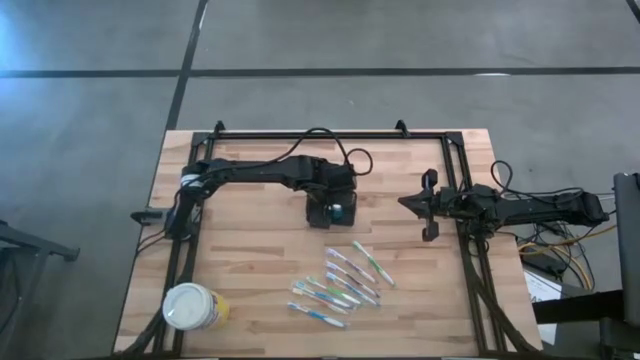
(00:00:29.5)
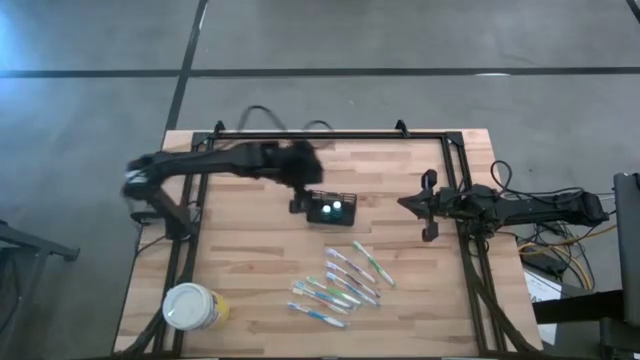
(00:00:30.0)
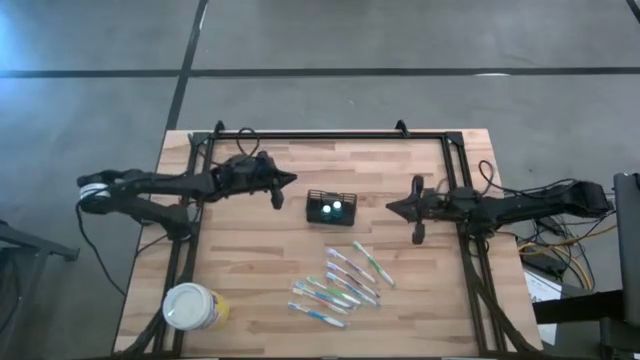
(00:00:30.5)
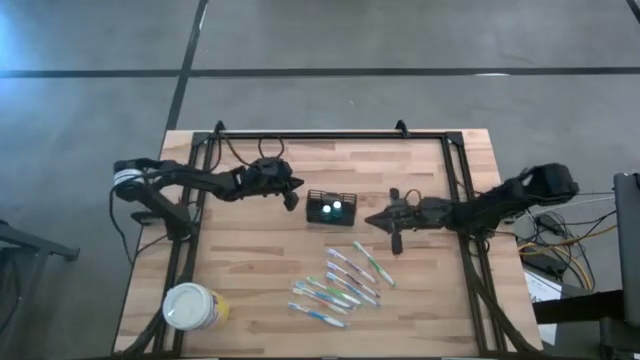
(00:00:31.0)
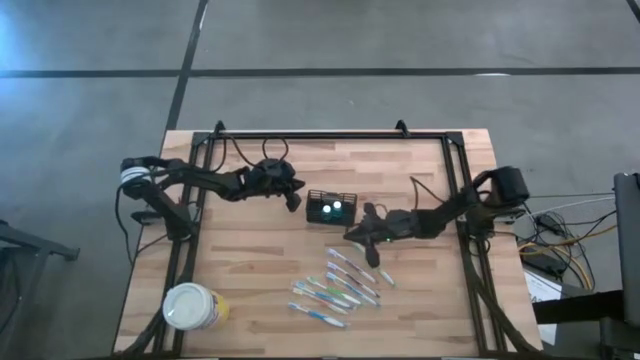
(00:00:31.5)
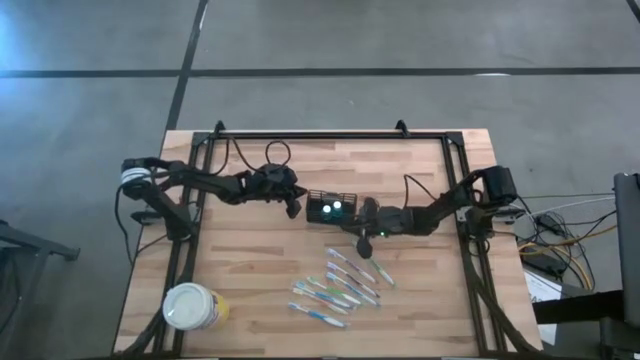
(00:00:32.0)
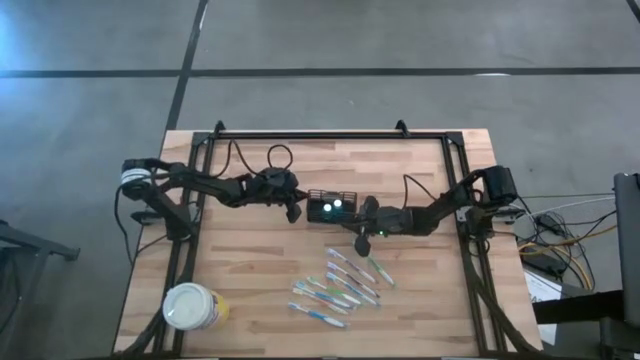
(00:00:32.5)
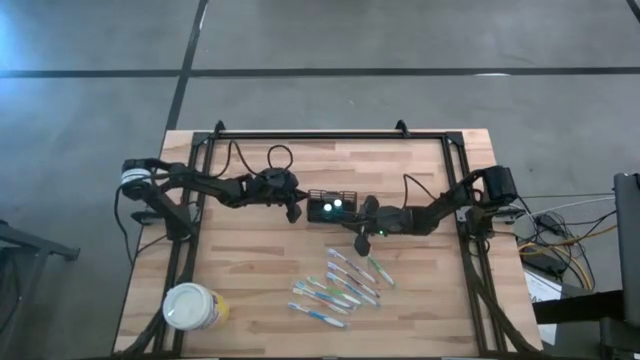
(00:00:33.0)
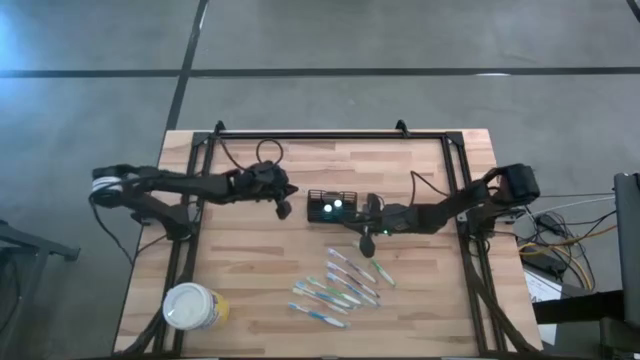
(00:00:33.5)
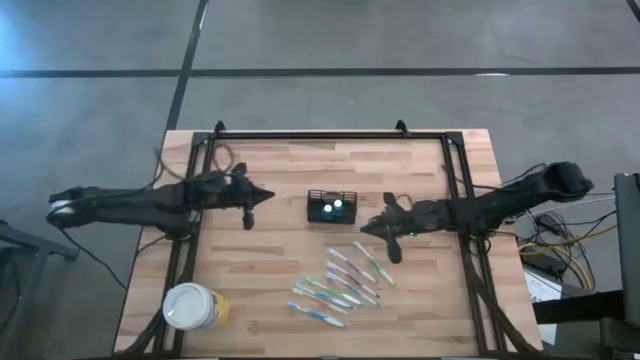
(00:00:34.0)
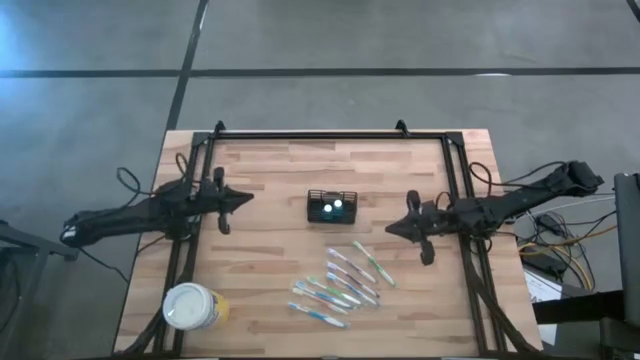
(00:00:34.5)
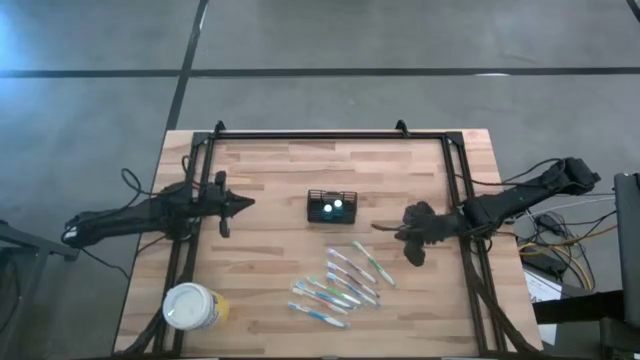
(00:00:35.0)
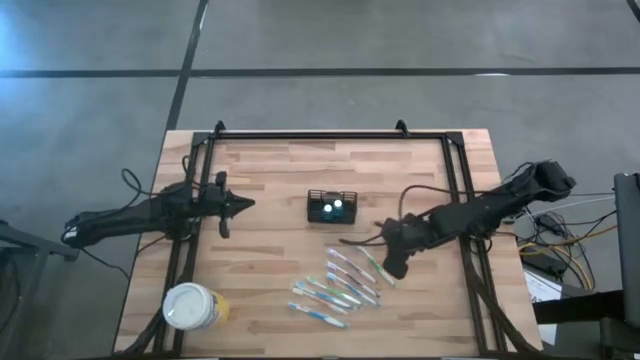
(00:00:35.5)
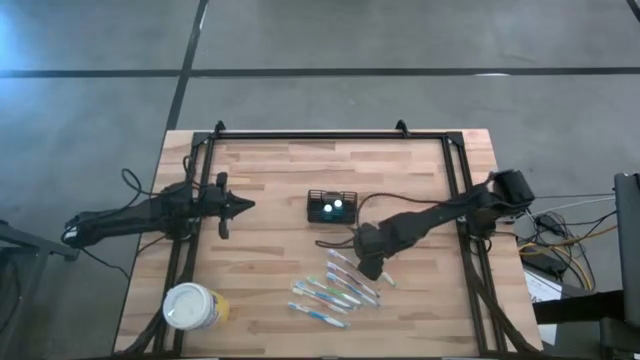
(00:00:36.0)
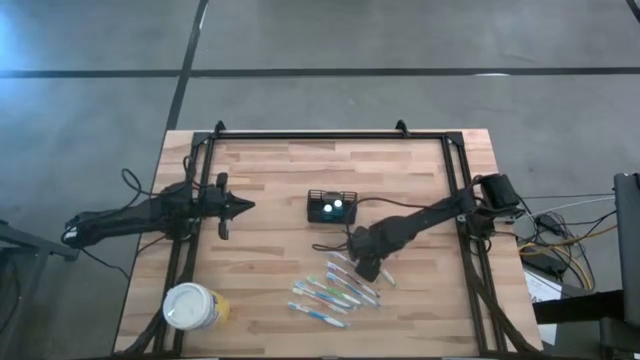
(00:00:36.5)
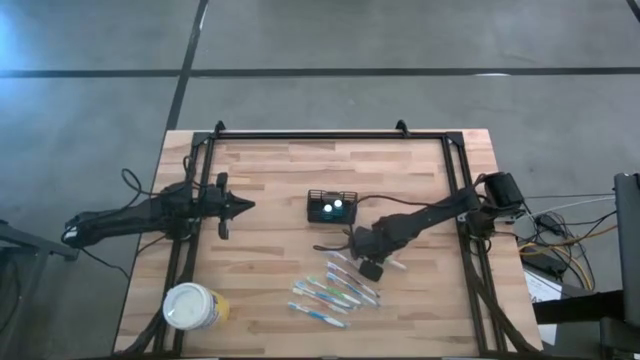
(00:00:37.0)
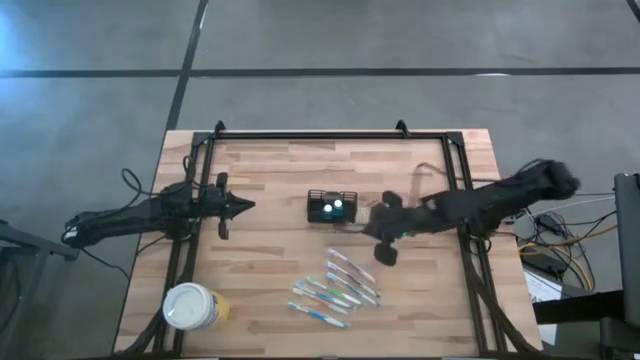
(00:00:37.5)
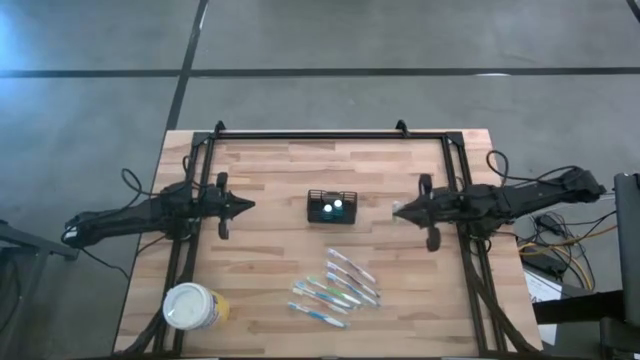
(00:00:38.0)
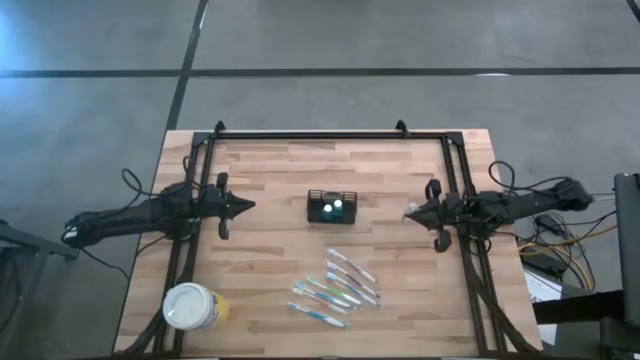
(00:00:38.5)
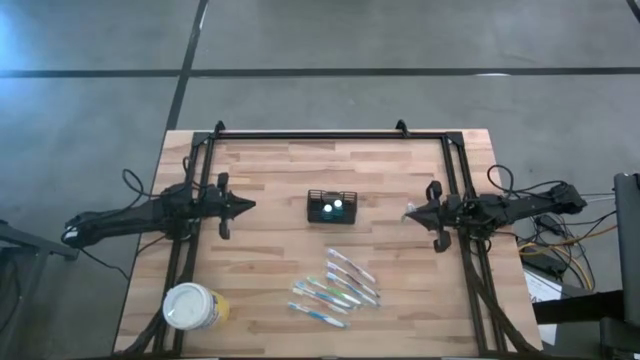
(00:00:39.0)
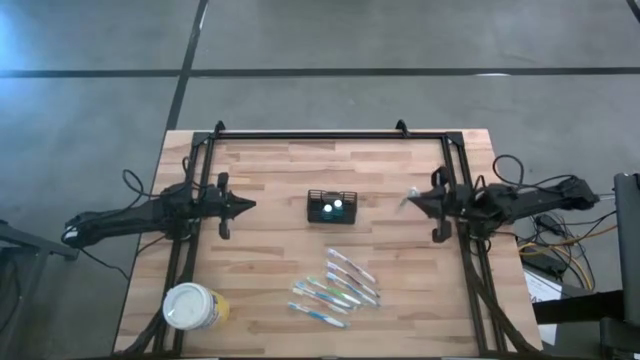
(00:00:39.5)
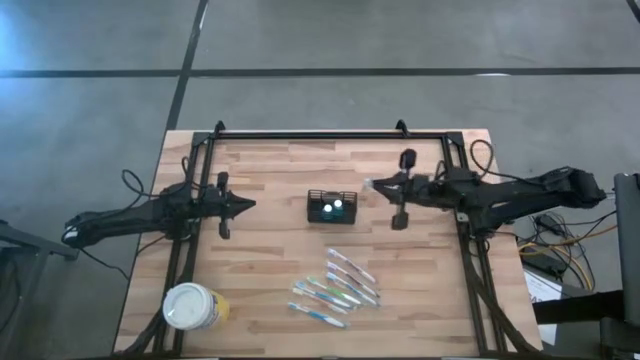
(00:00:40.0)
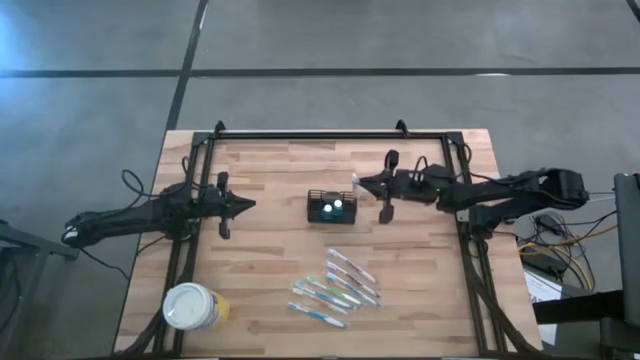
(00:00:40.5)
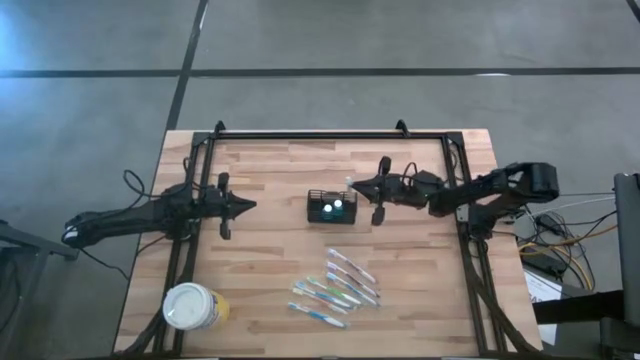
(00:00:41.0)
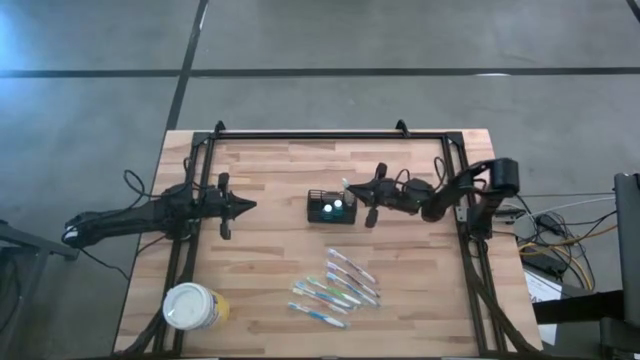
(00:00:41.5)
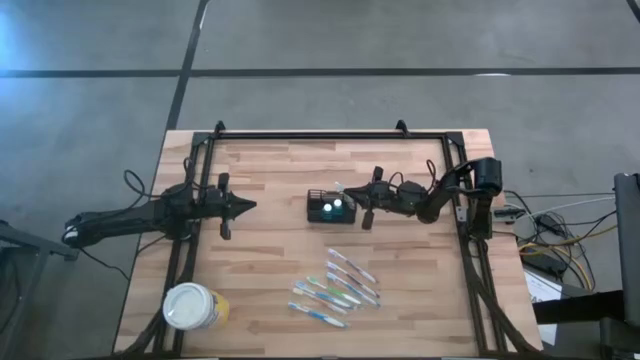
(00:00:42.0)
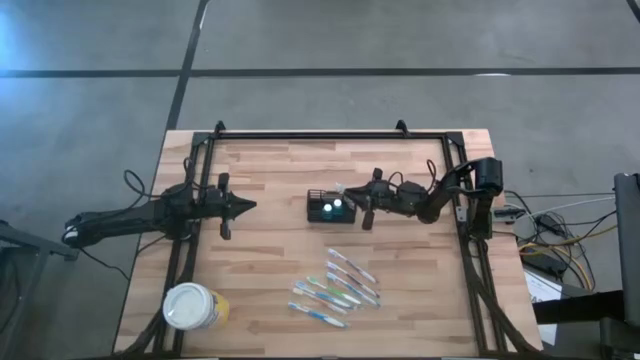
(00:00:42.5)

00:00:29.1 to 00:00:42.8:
Task: Pick & Place toothbrushing station
Put the top green toothbrush into the black organizer

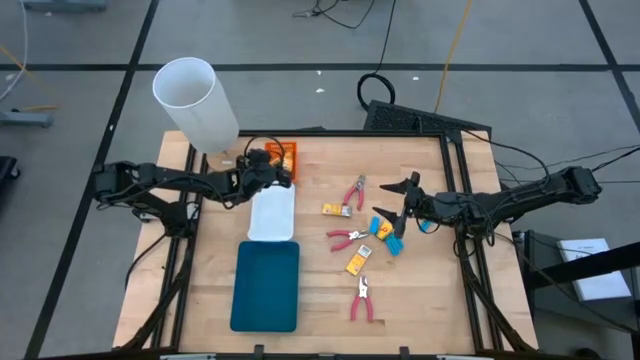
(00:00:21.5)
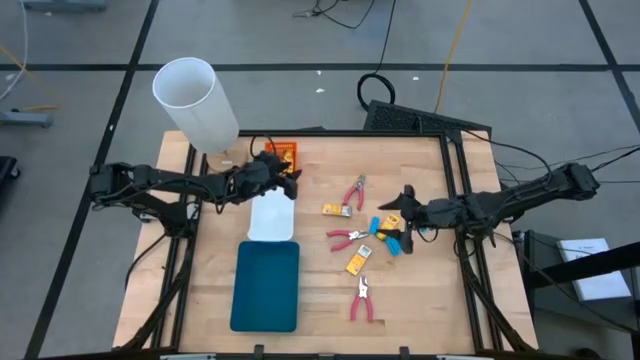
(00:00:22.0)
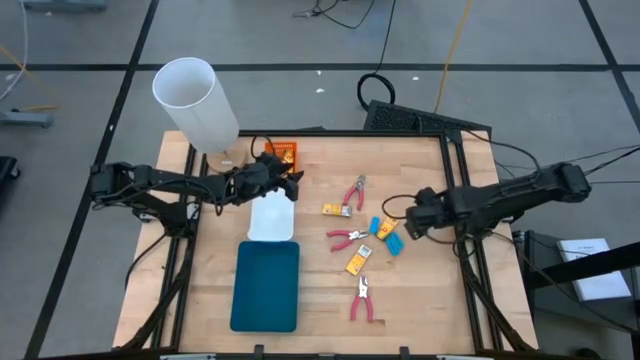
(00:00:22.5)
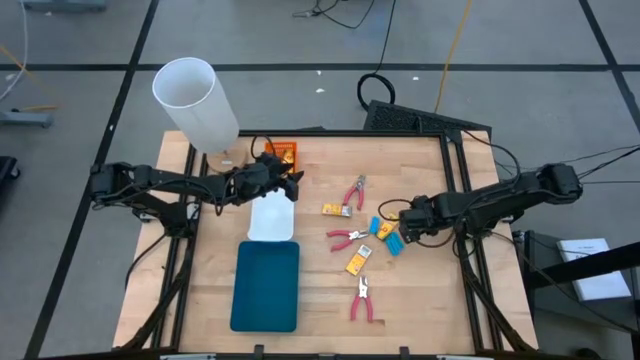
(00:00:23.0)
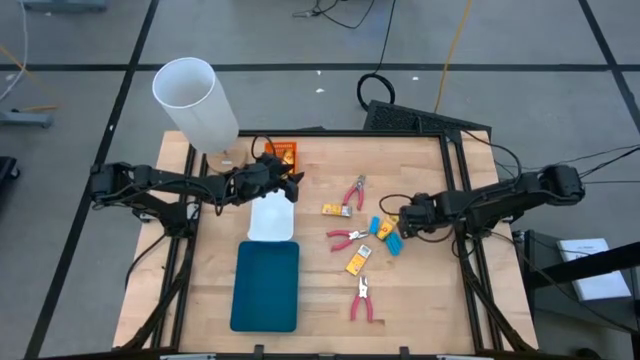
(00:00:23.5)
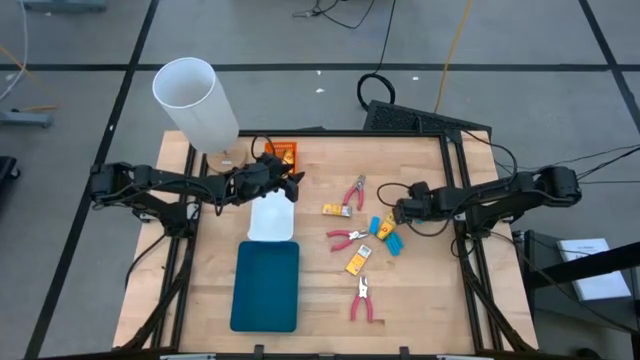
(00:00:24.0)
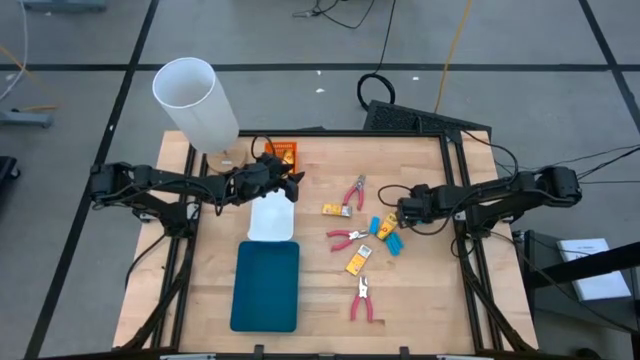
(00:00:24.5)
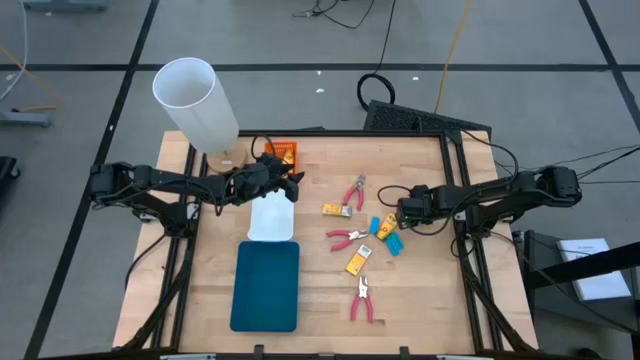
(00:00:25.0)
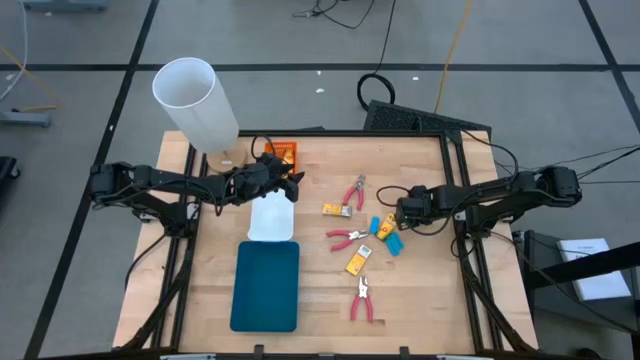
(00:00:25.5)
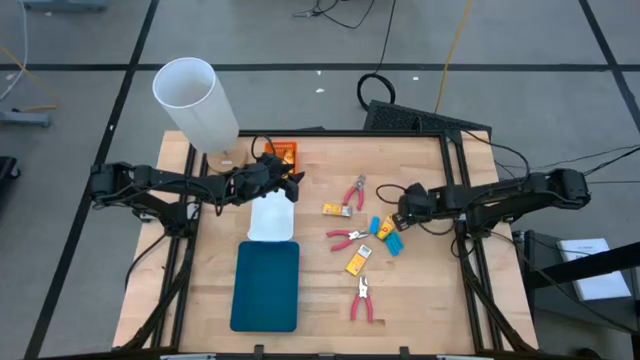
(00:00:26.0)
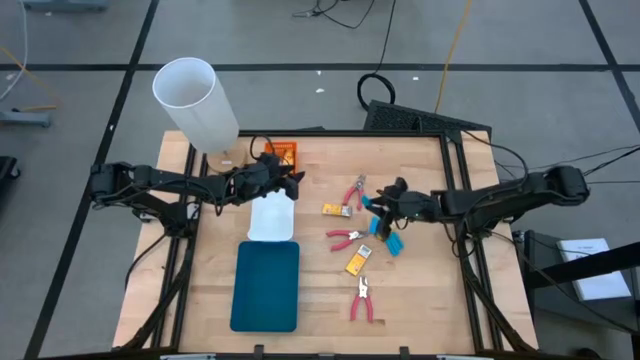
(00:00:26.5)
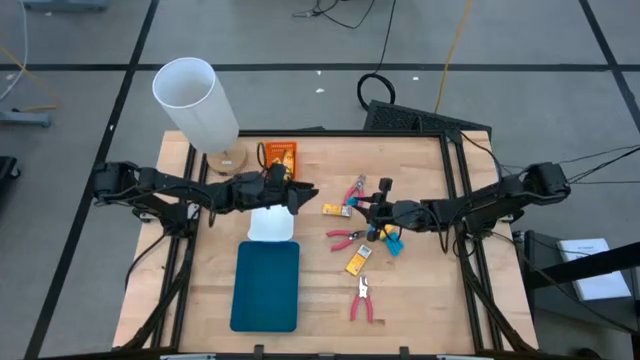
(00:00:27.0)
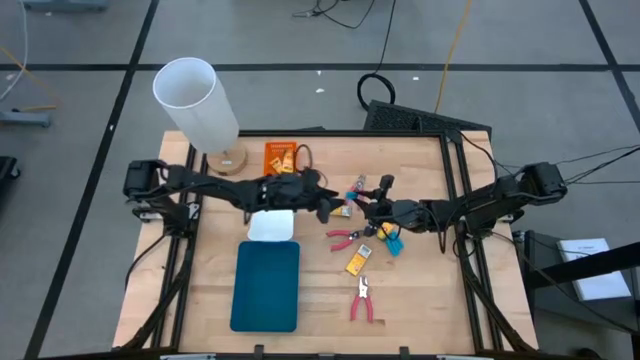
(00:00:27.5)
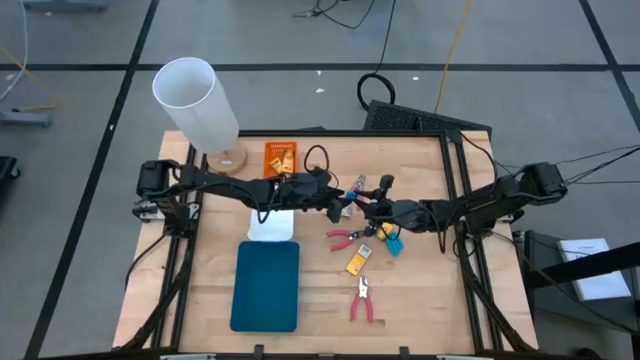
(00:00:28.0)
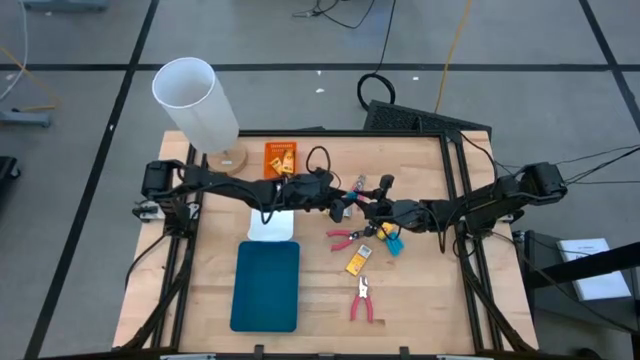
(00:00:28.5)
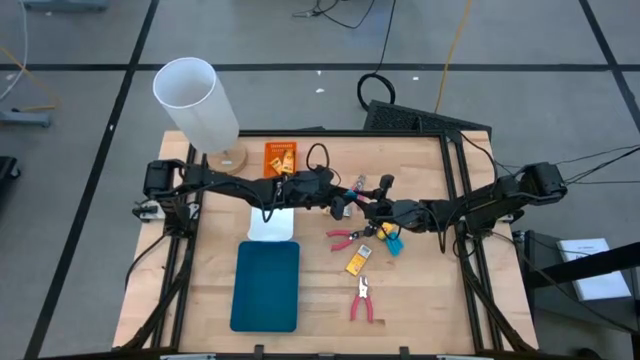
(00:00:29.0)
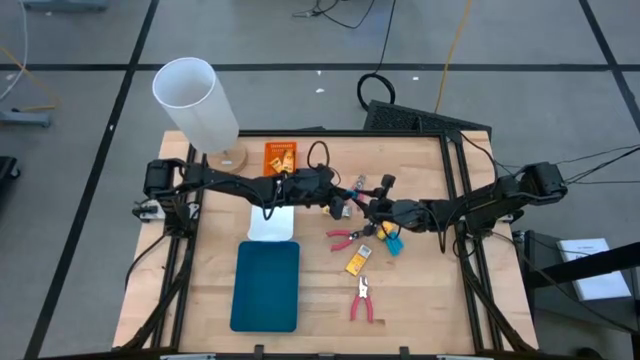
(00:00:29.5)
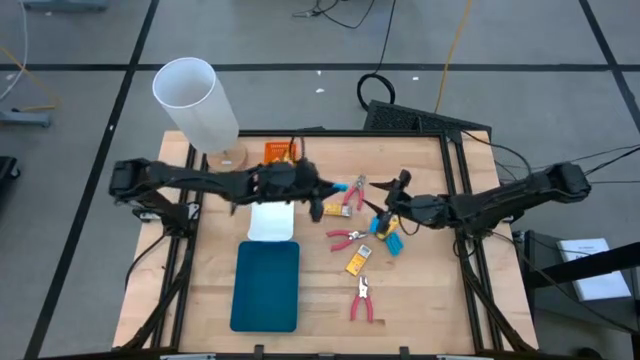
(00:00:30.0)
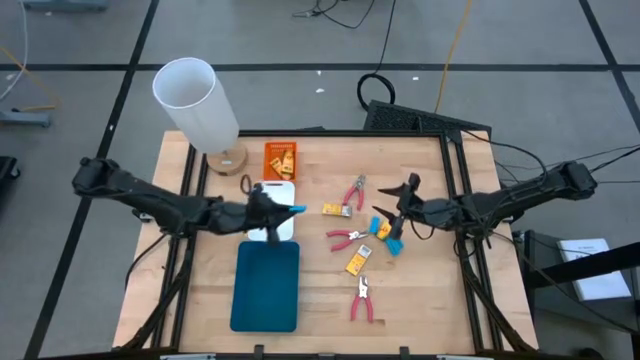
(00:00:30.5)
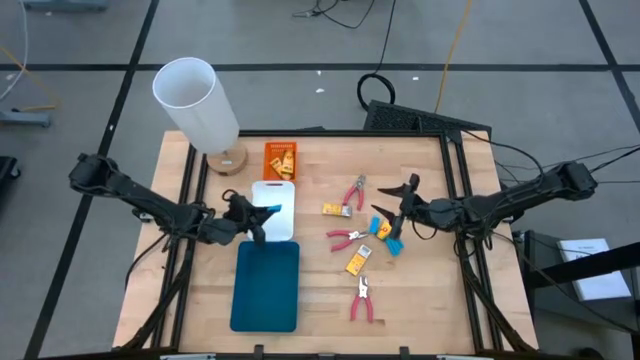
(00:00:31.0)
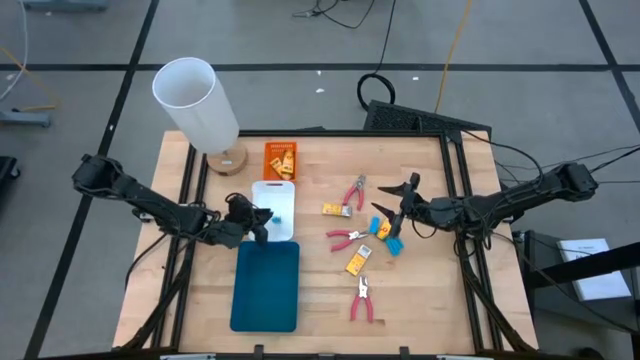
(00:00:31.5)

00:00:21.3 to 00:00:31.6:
Task: Pick & Place School Supplies
Put the blue eraser into the white bin
